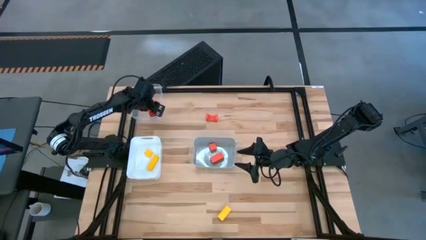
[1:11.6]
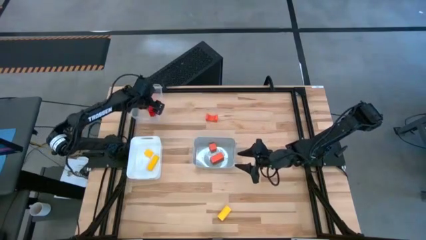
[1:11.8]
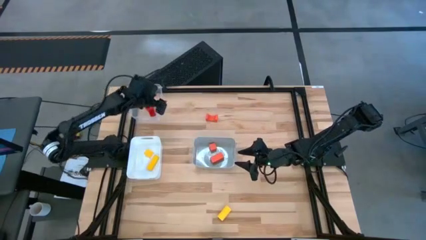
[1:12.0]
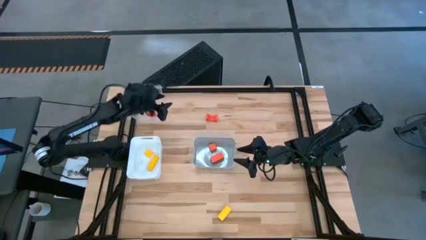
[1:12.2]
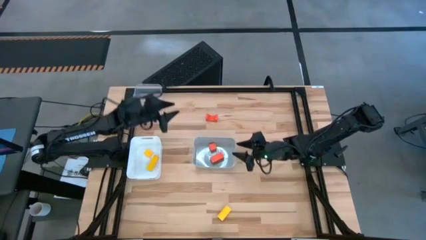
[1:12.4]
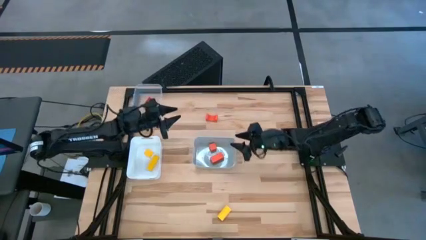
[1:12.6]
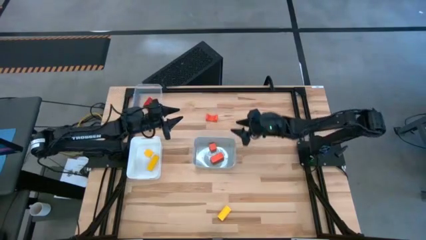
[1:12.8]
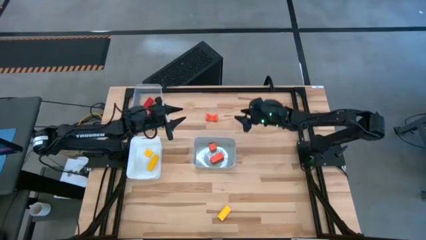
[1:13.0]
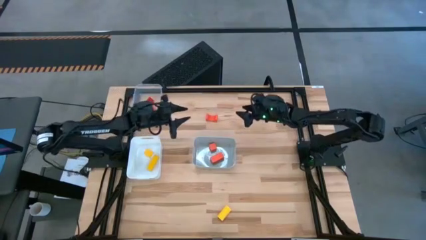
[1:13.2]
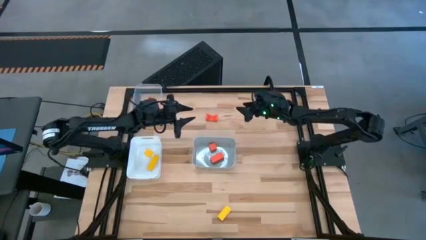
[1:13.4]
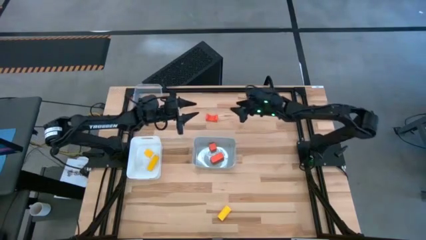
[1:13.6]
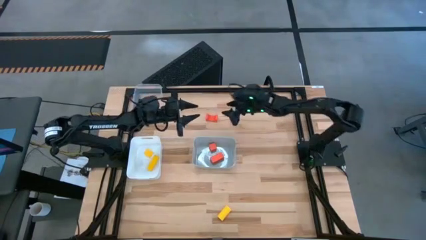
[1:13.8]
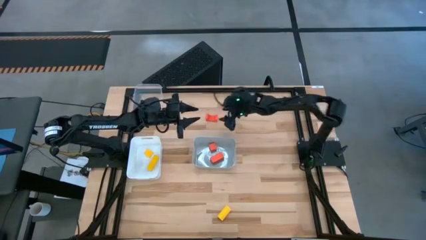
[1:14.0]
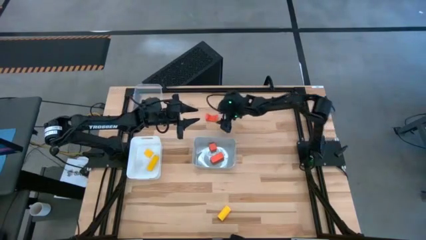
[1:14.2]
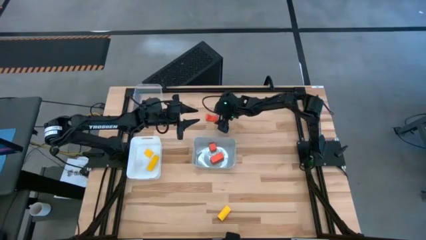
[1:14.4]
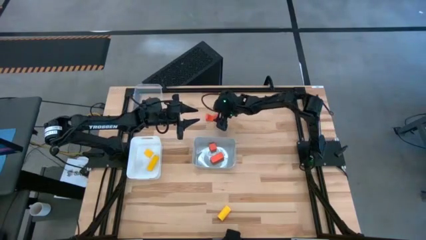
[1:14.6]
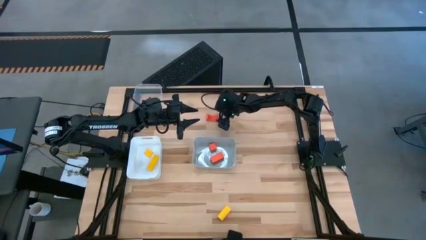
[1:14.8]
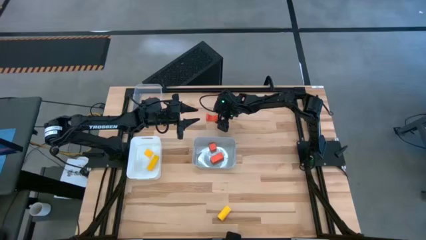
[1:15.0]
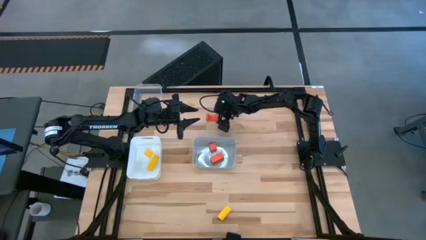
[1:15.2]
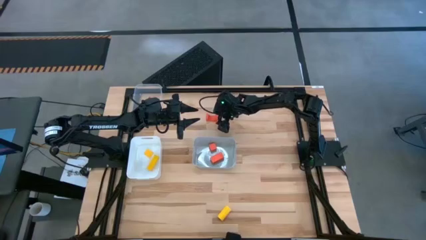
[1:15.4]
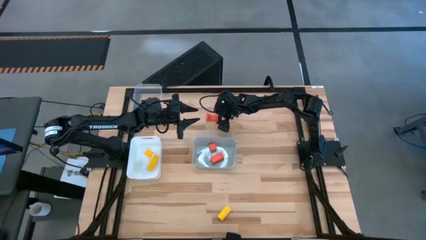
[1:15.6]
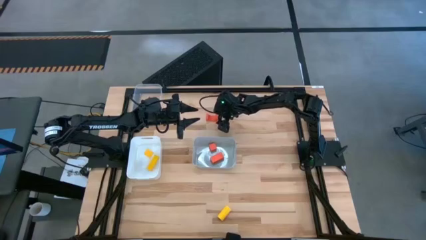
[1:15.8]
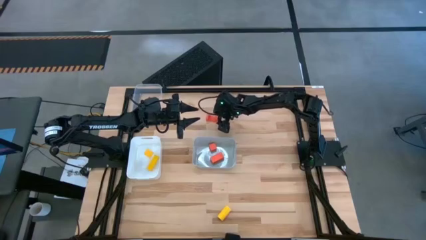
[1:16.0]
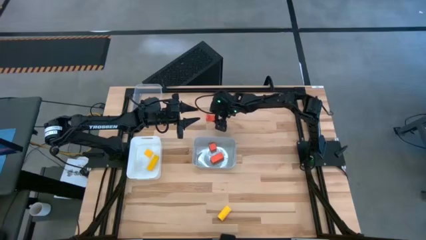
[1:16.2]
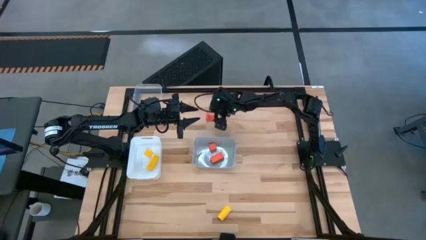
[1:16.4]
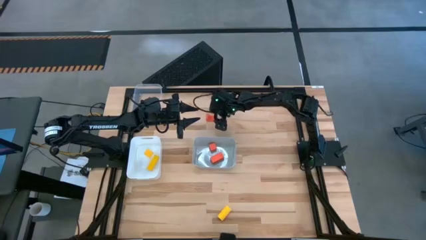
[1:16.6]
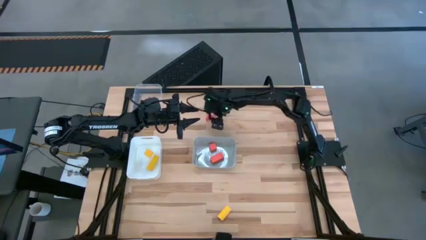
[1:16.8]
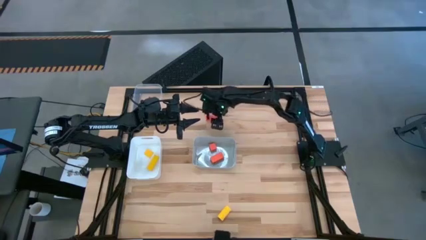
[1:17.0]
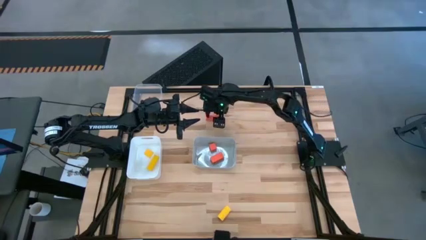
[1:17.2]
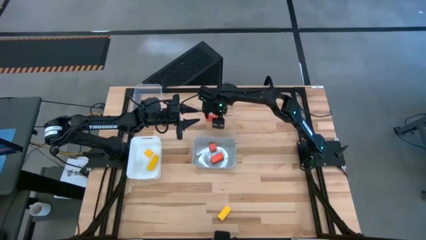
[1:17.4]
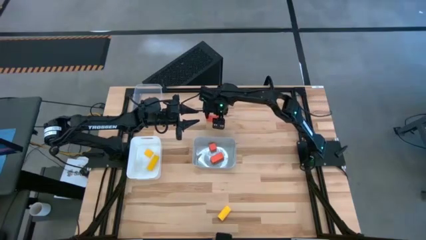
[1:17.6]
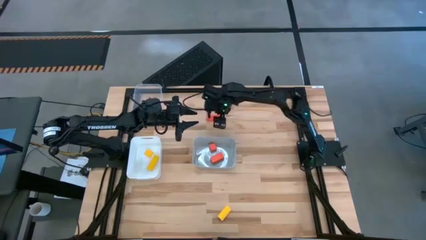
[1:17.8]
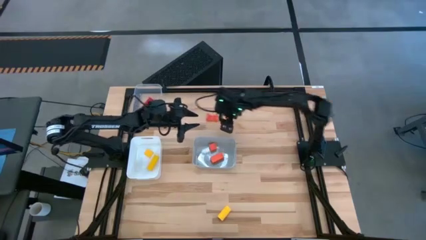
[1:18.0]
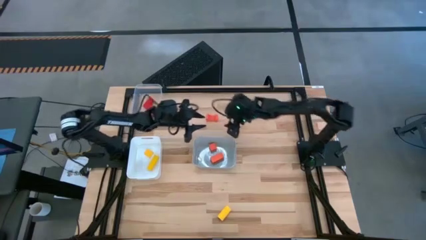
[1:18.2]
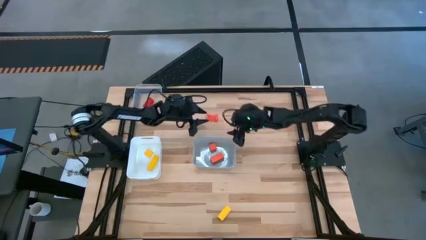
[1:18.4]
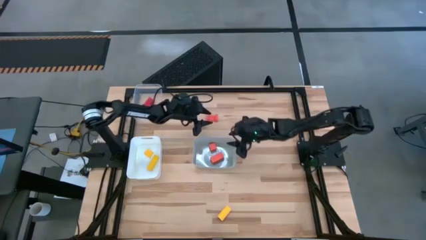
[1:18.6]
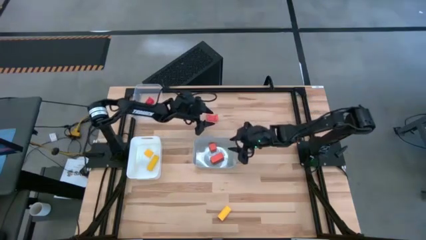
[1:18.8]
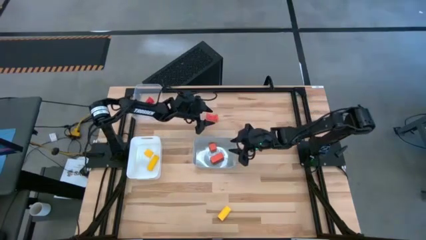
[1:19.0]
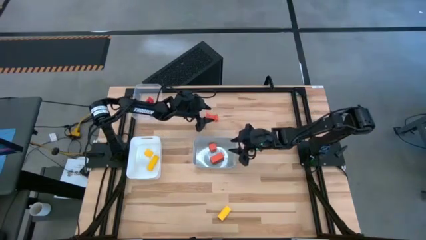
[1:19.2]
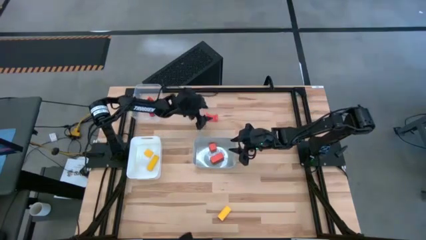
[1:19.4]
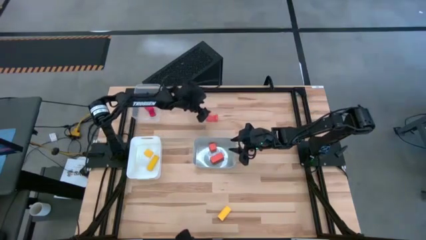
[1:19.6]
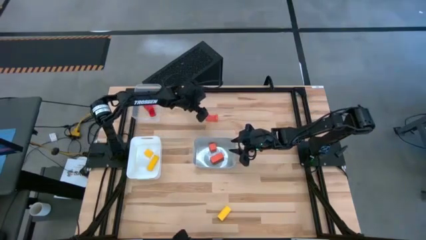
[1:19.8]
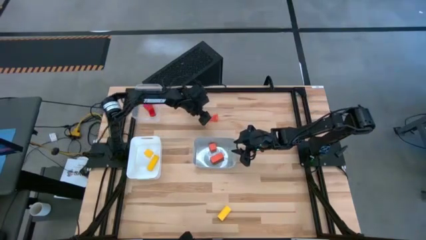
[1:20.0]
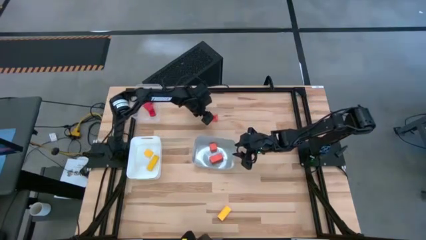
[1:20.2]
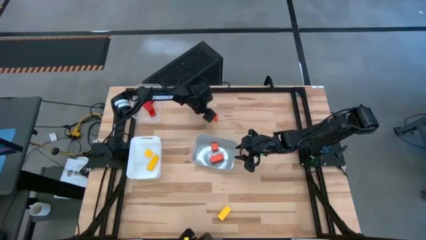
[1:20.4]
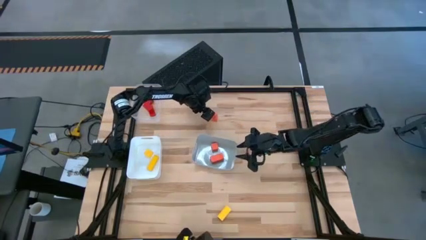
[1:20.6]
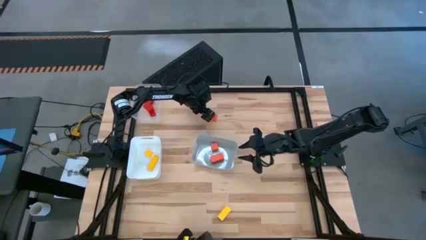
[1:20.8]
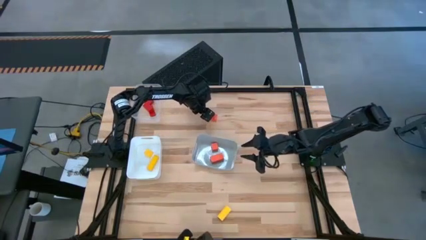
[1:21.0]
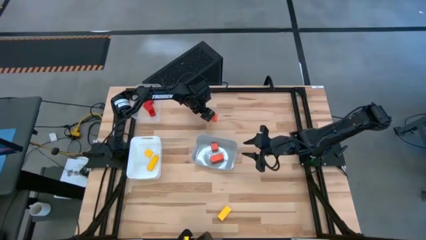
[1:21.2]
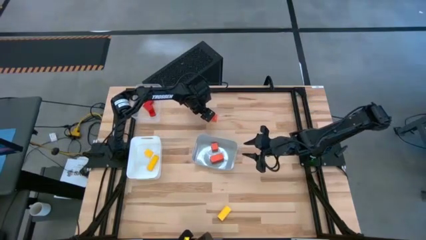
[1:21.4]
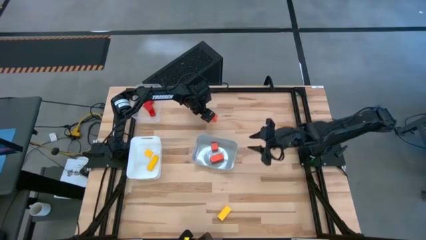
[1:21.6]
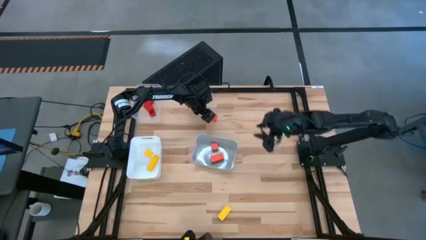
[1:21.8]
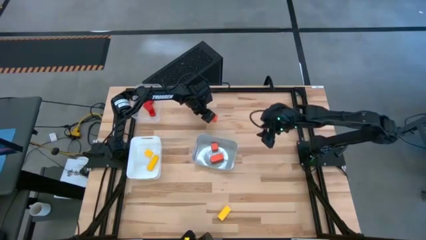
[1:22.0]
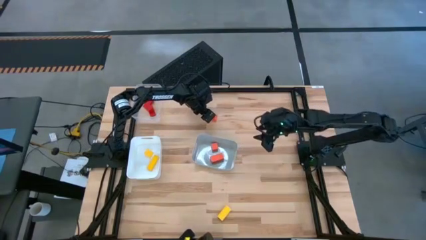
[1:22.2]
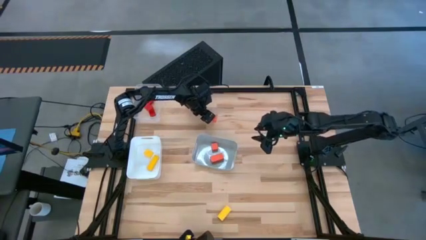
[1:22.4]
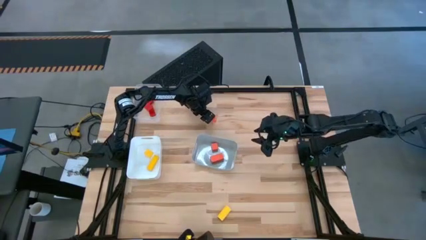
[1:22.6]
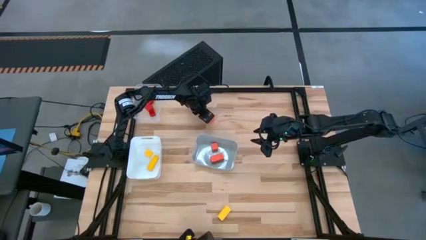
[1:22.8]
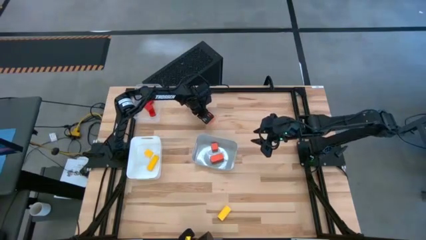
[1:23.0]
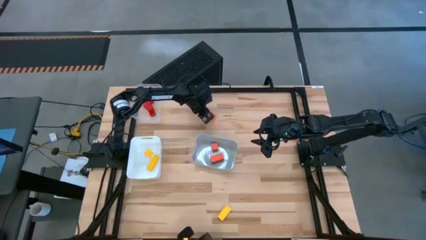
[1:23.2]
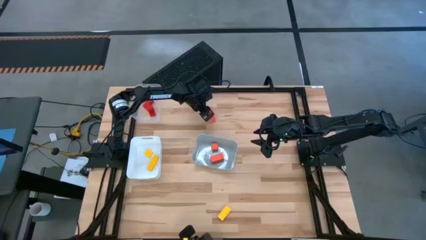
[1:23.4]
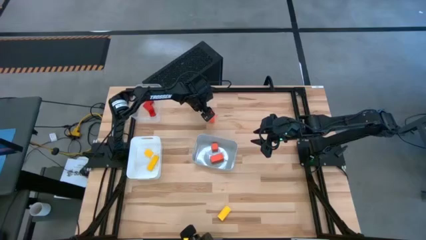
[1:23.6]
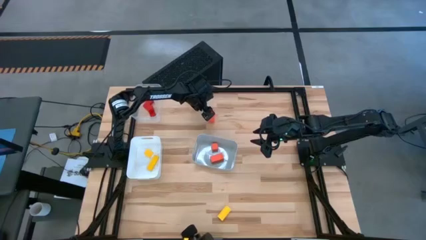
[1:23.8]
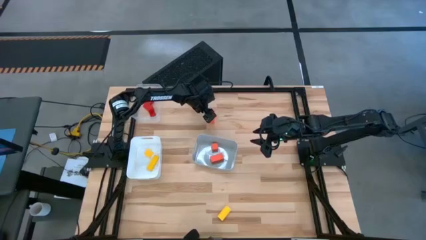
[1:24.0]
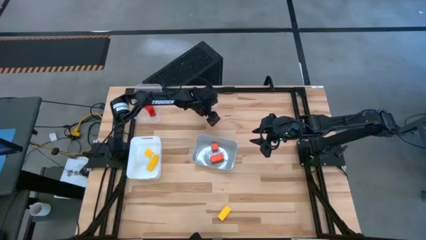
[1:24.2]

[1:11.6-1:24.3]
Task: Sort & place blocks by color
Put the orange wooden block into the gray bin

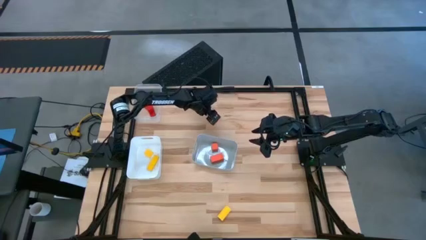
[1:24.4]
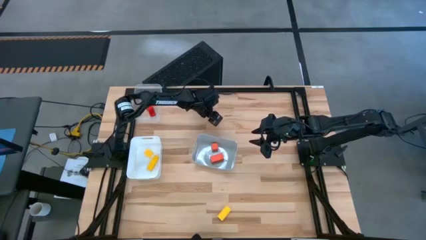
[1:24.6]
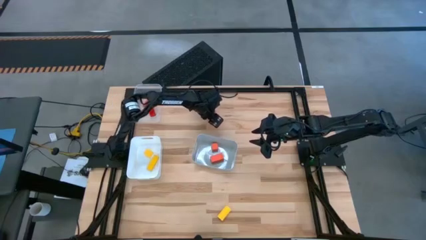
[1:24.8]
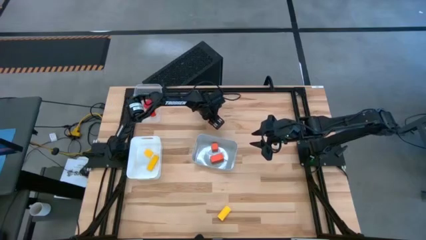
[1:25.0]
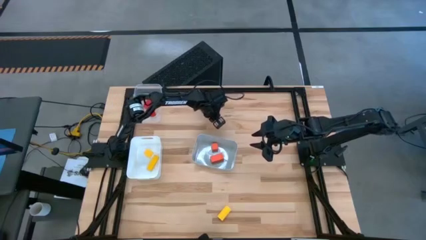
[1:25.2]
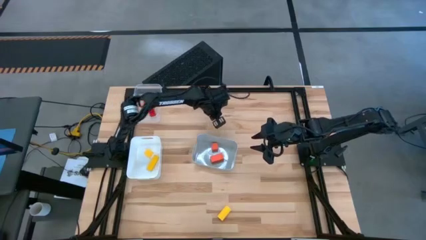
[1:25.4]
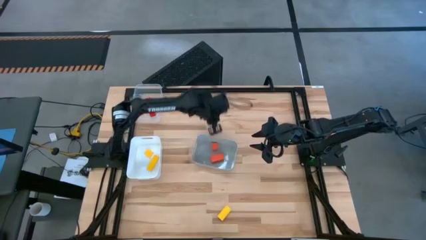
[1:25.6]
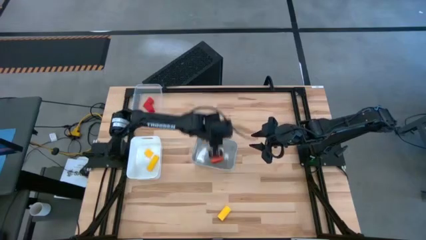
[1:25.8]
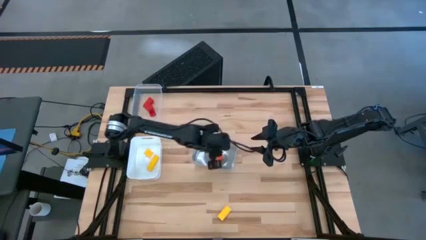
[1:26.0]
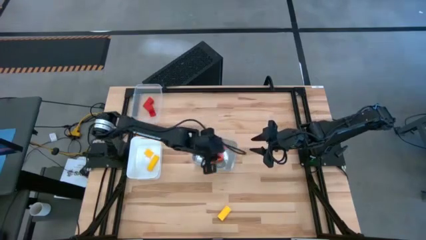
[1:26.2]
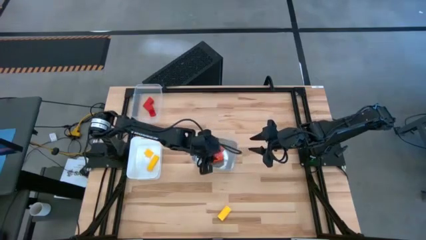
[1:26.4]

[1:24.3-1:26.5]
Put the orange wooden block into the gray bin
